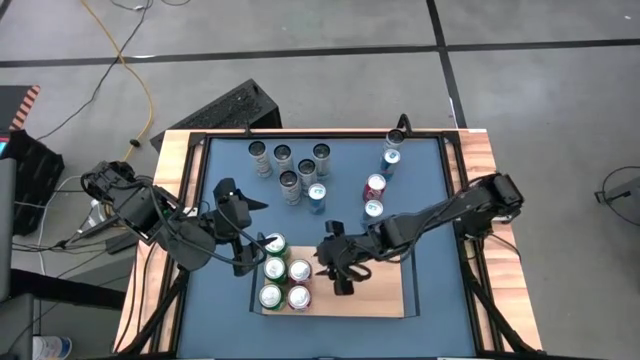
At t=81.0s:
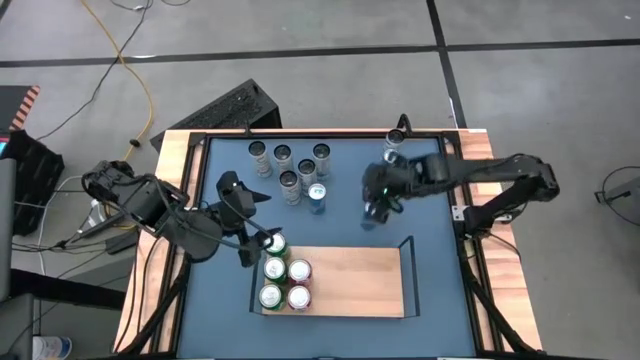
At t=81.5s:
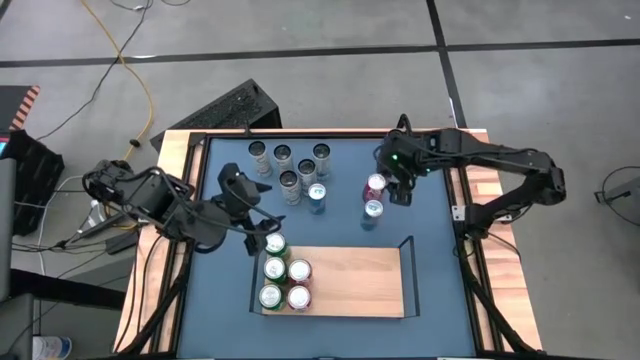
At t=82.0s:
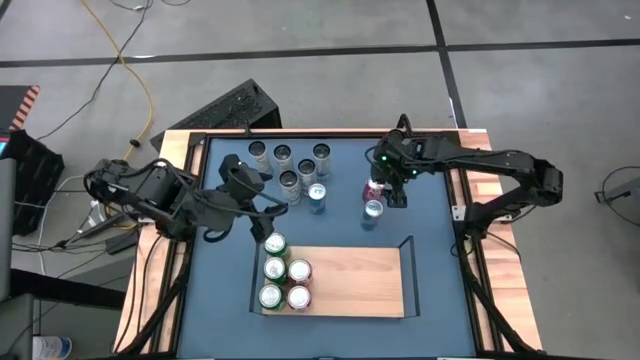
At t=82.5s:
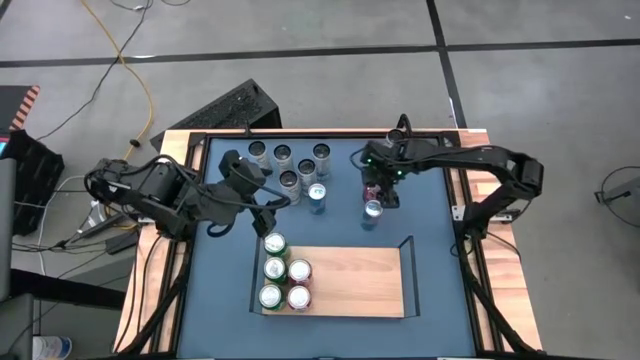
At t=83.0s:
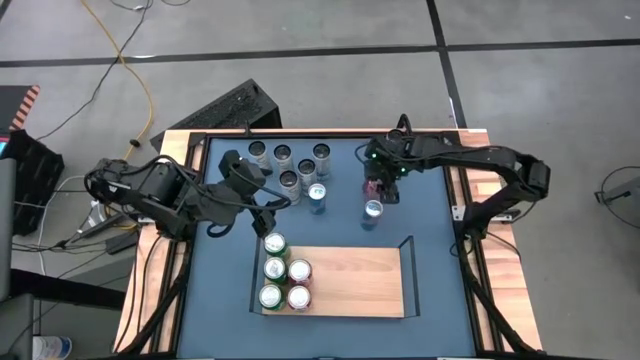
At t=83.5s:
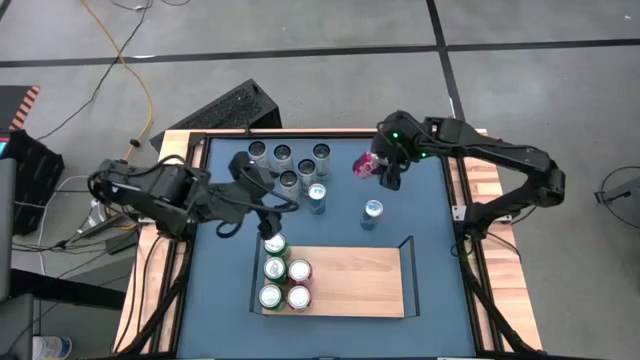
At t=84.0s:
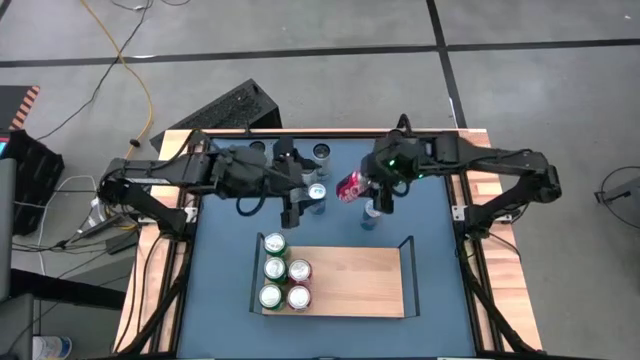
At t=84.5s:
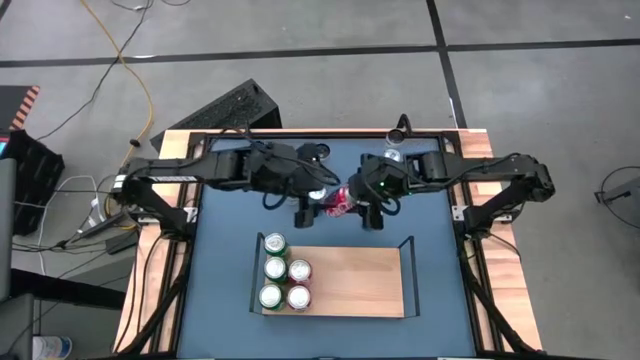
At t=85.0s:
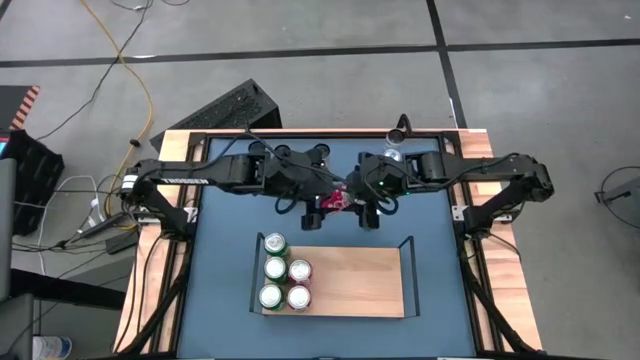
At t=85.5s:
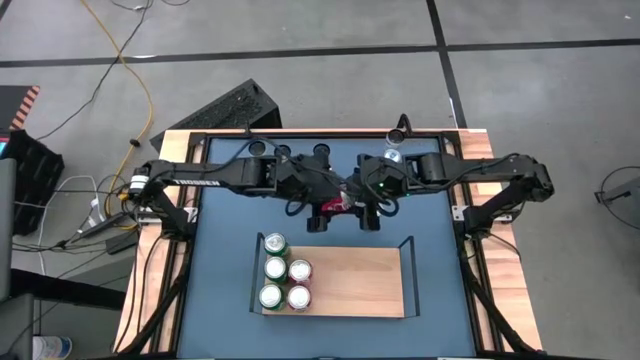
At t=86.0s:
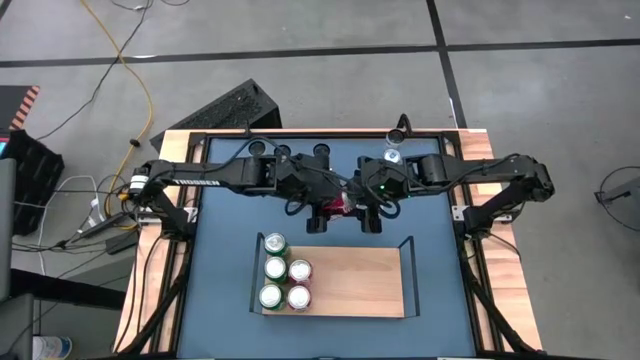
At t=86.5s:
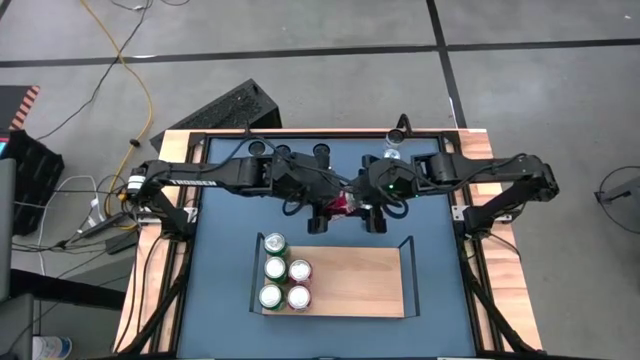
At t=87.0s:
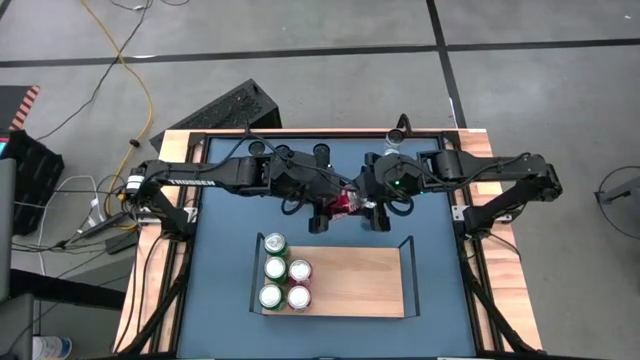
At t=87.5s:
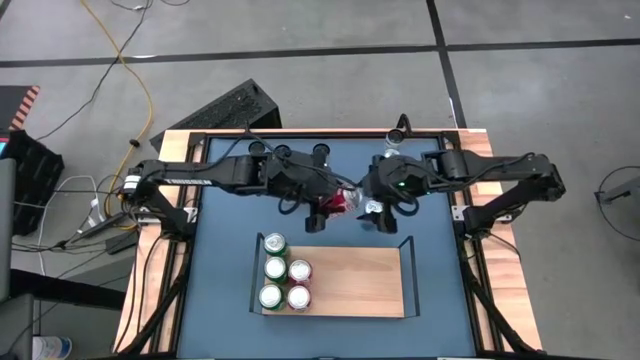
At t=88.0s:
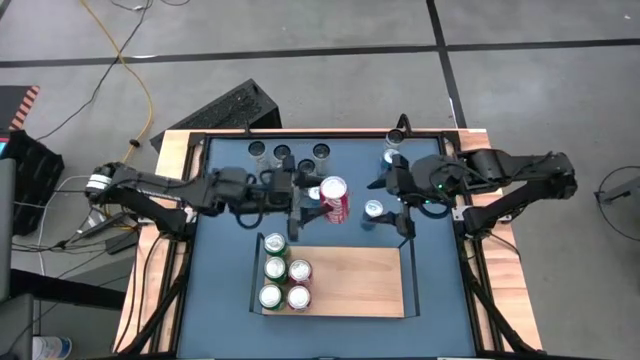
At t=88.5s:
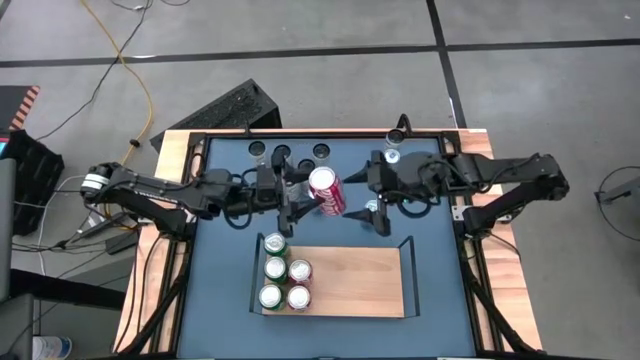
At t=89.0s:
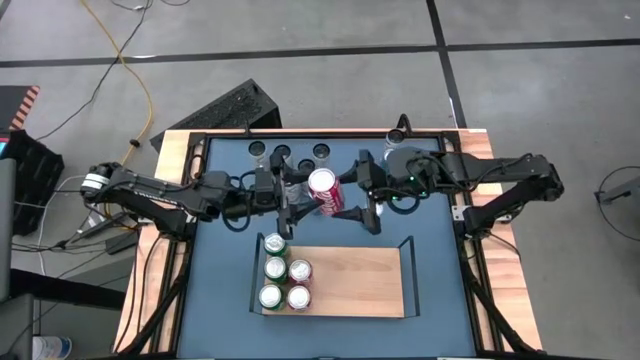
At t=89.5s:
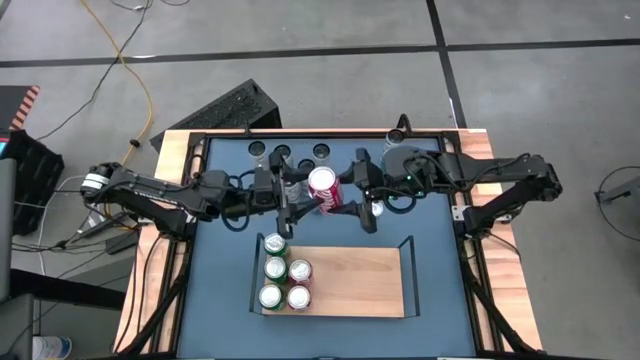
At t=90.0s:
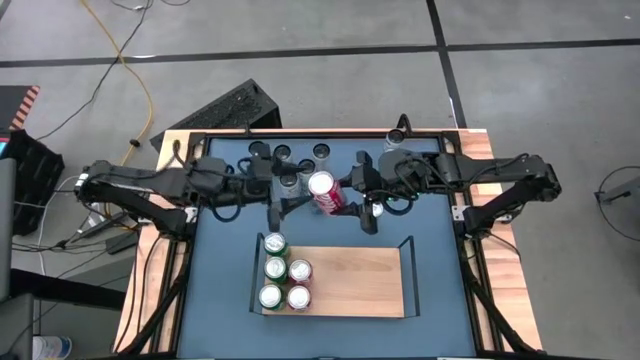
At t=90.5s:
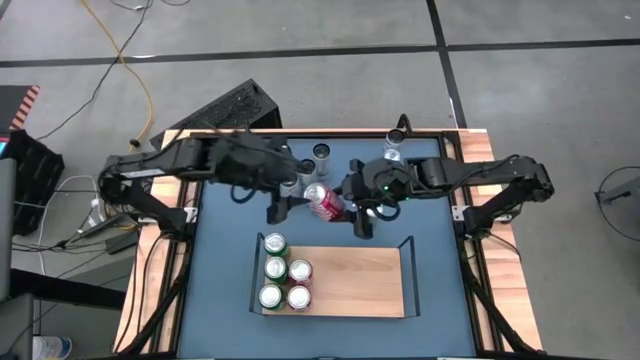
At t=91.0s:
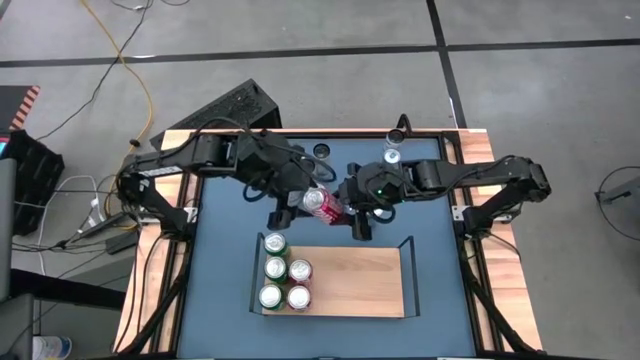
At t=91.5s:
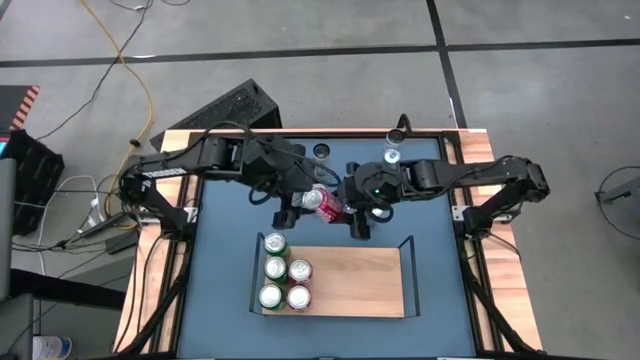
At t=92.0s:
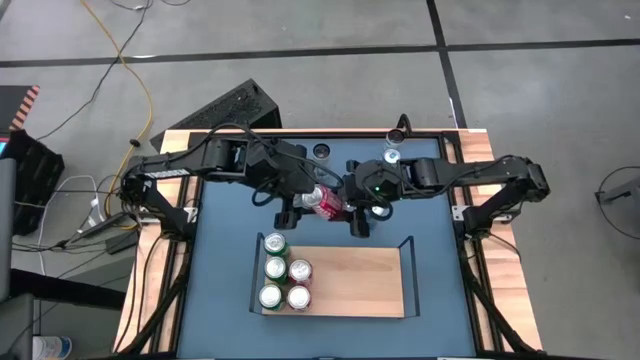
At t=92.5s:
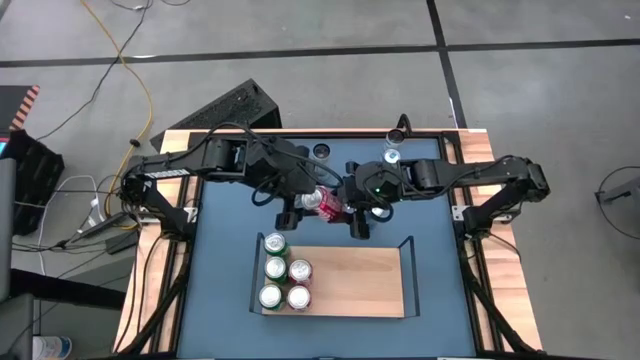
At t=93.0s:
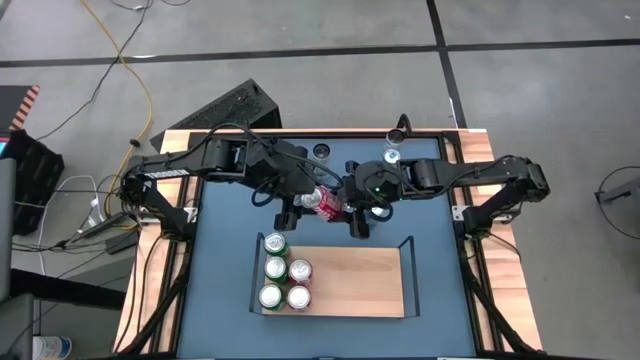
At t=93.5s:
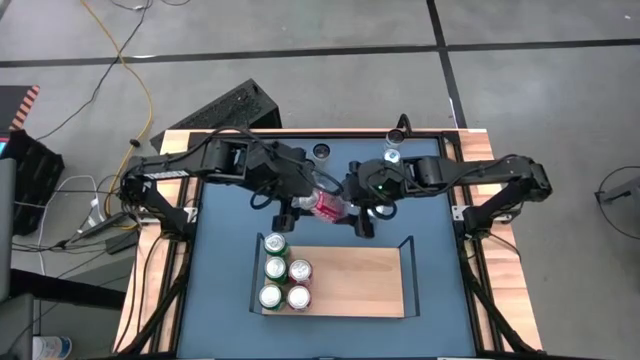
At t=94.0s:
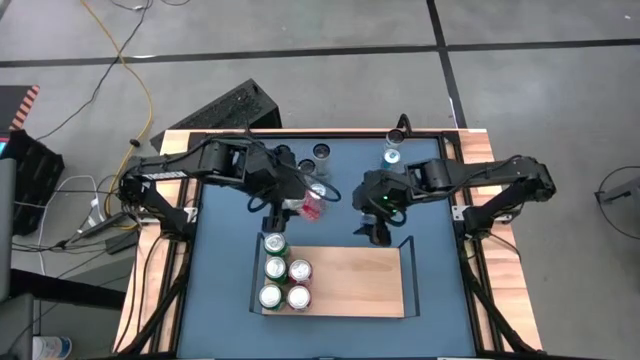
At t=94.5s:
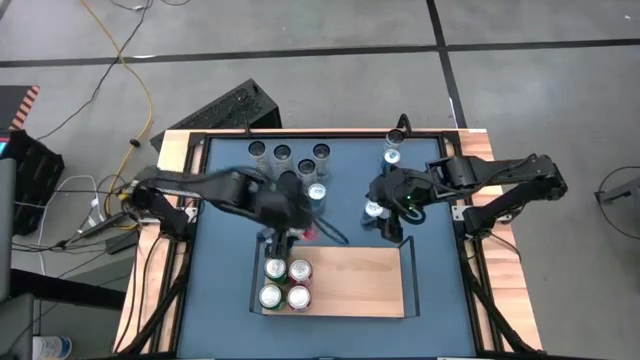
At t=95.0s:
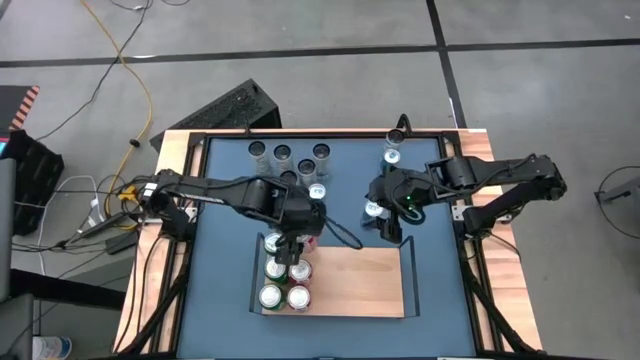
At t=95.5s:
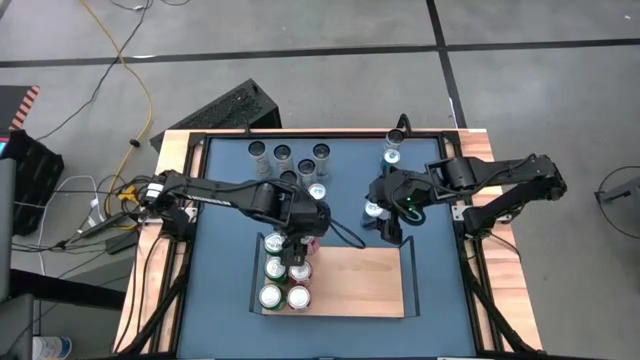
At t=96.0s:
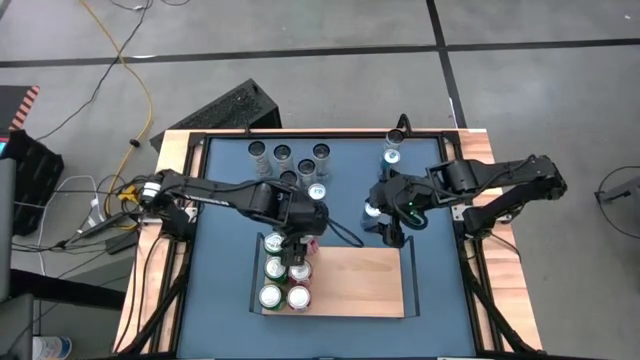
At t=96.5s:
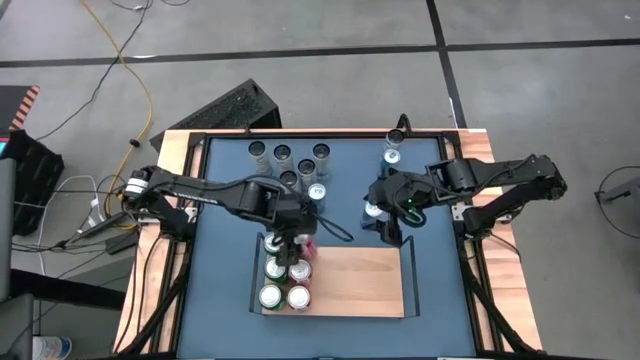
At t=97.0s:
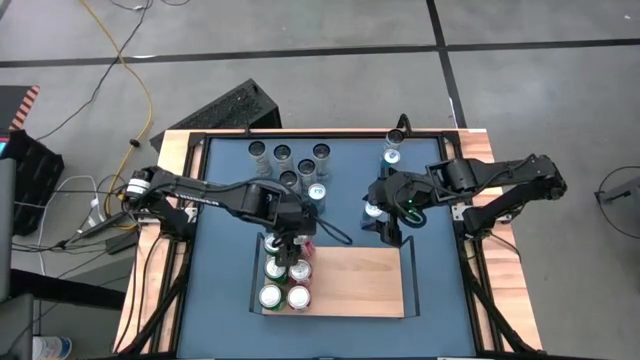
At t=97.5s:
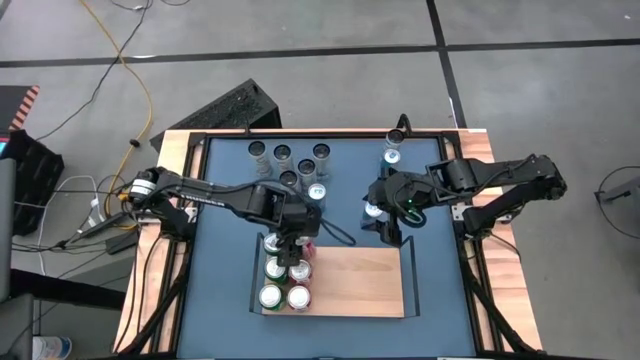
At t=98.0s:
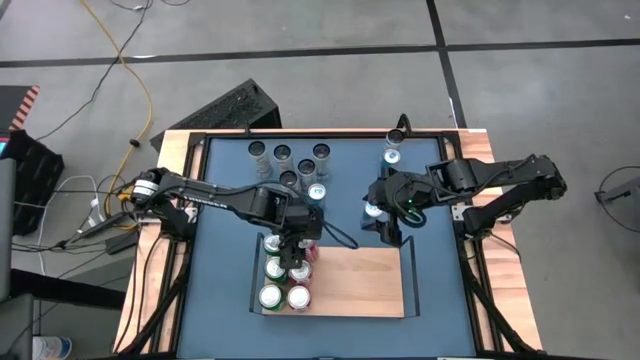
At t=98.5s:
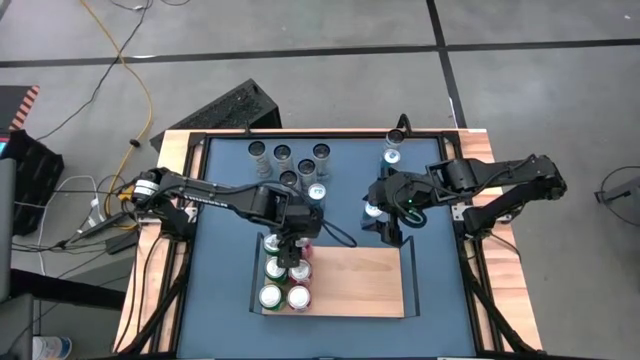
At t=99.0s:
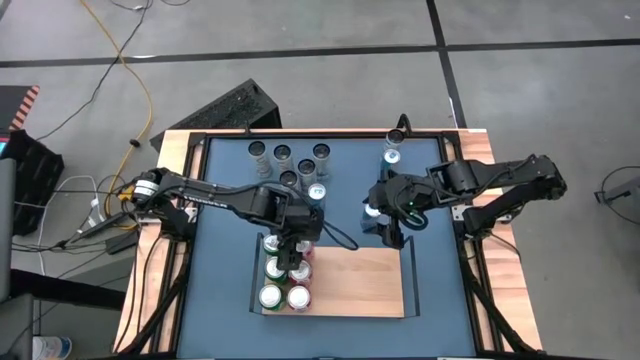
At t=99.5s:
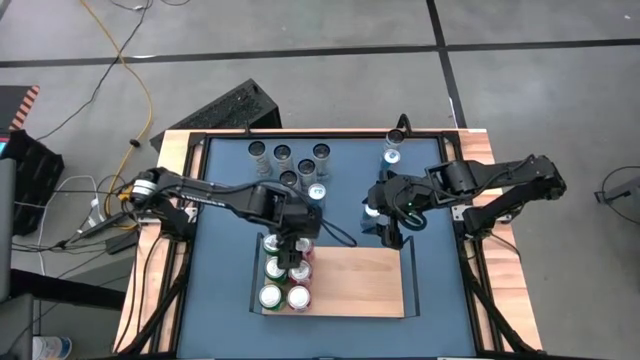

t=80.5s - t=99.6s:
Task: Place canned beverage on shelf
Put the top red-white soda can on the shelf aligned with the other red-white soda cans

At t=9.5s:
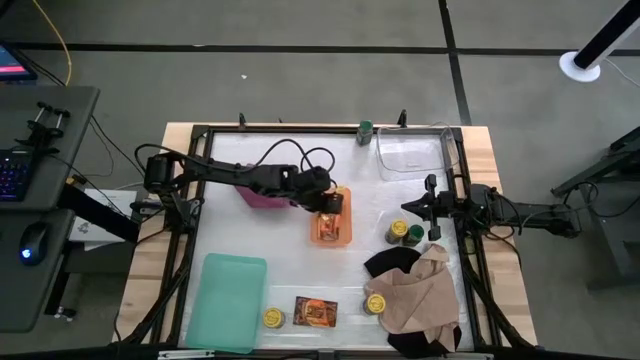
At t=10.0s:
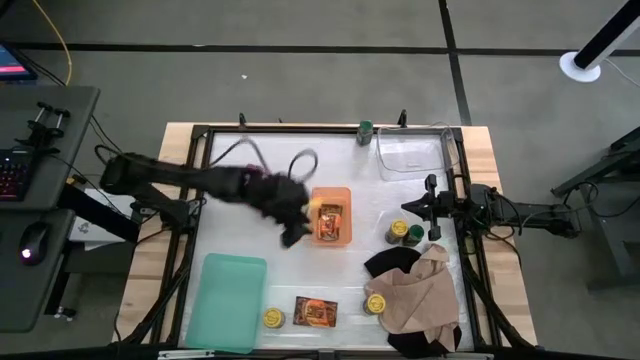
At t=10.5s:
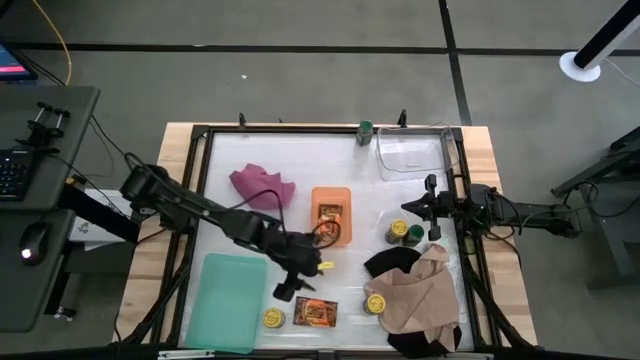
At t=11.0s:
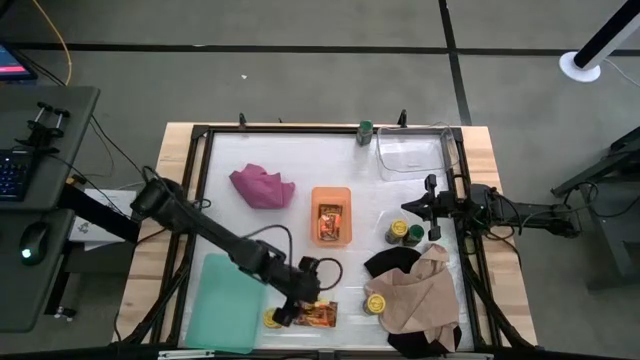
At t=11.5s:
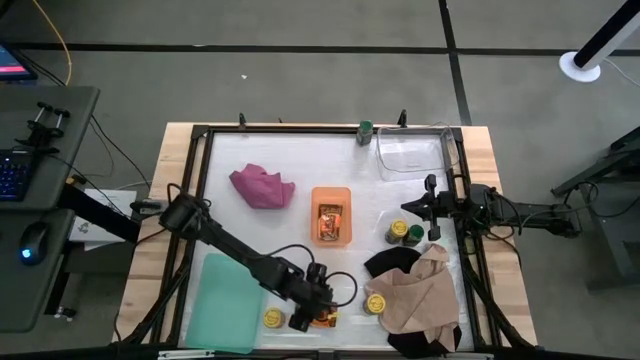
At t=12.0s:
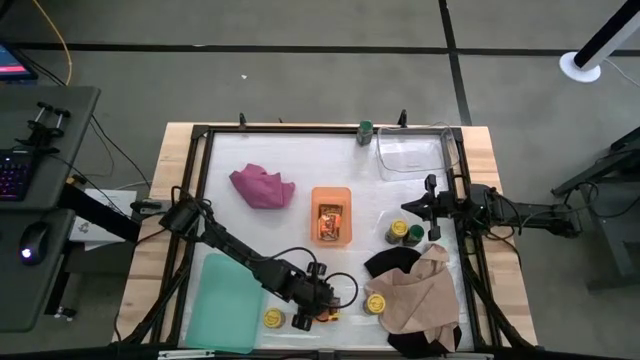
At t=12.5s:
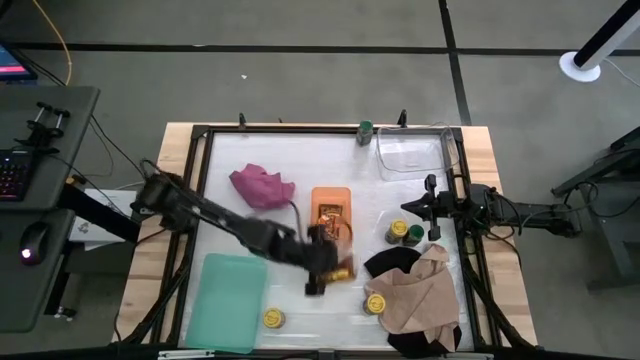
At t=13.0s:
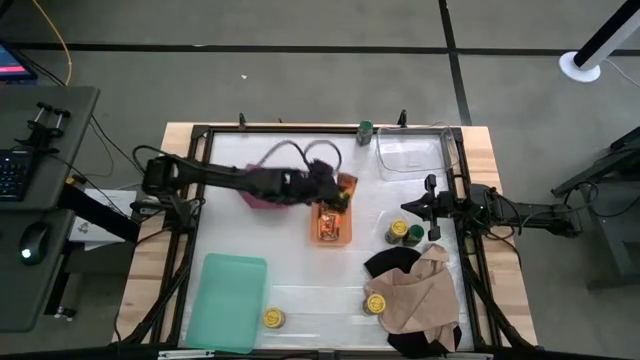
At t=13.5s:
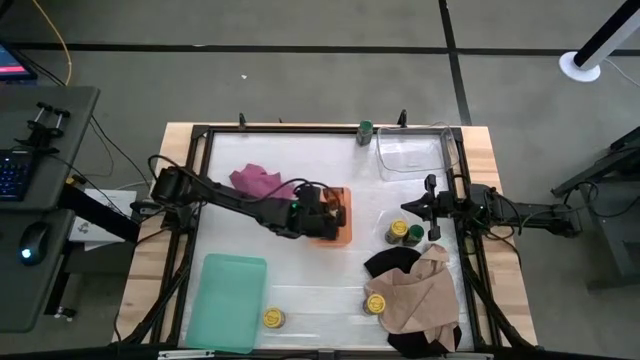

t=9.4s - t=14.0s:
Task: Sort spices by type
Stack the orange seasoning sachet on top of the orange seasoning sachet into the orange bin
